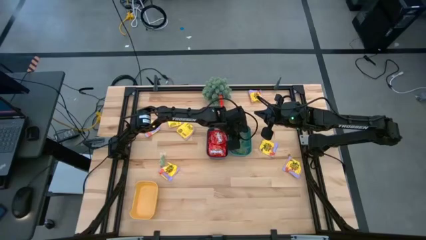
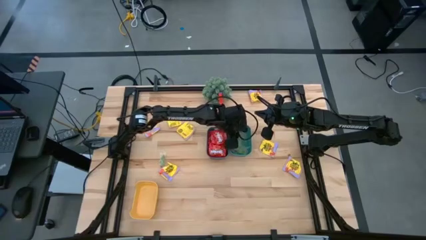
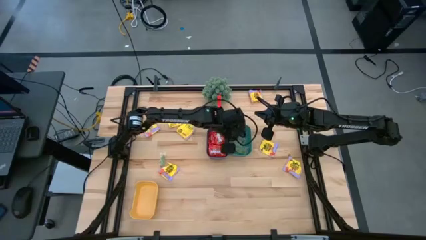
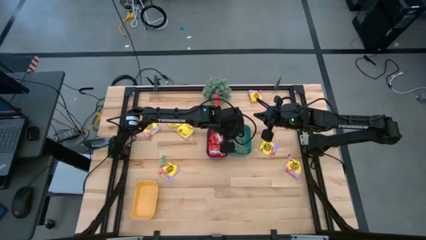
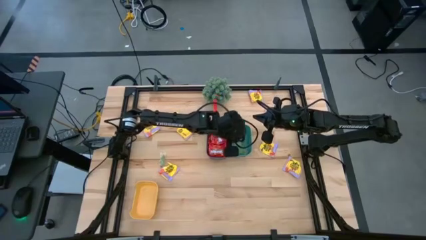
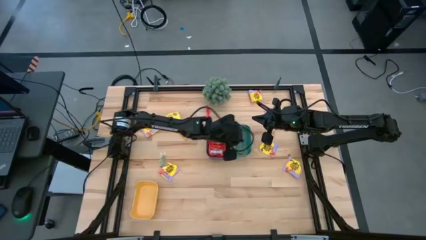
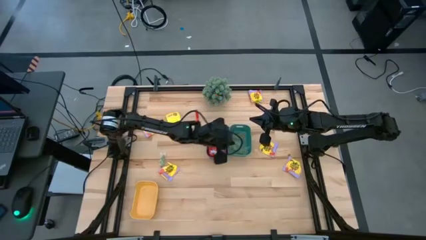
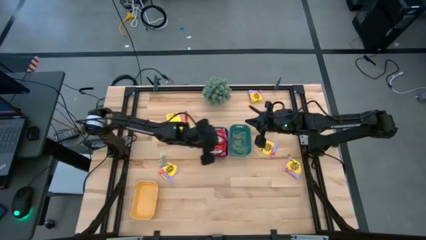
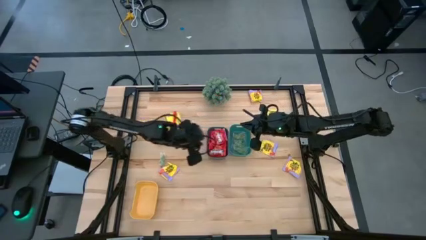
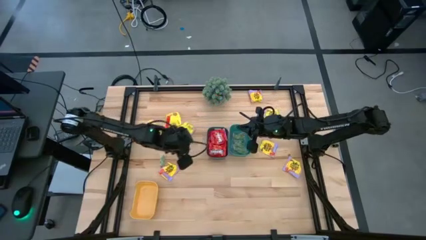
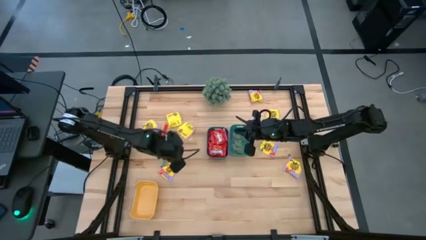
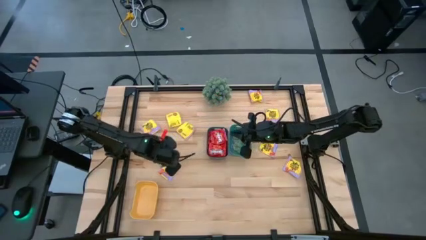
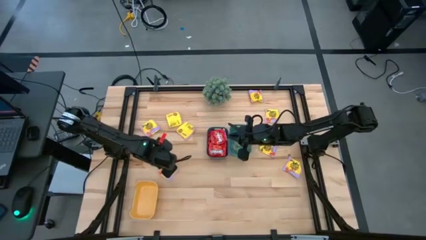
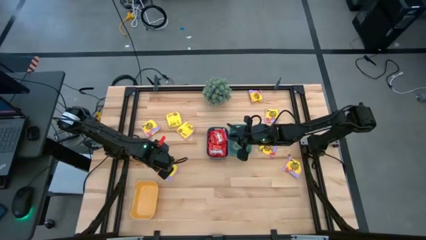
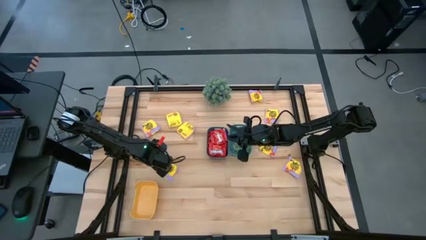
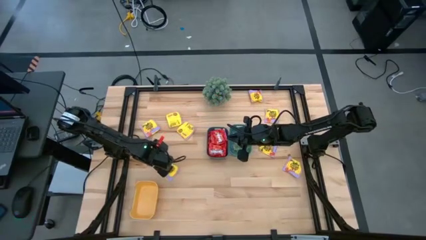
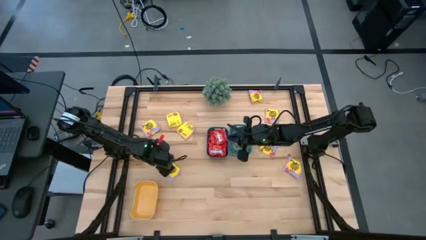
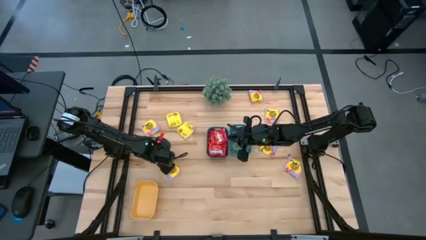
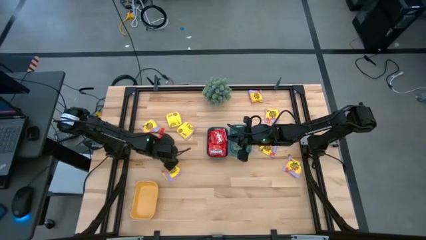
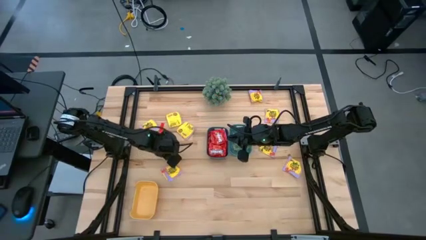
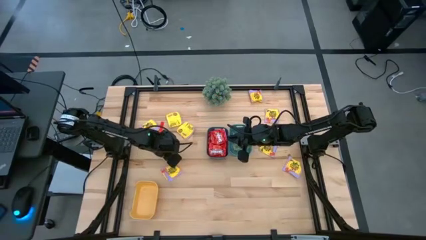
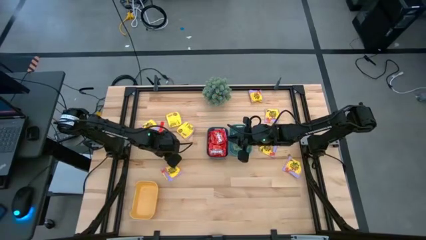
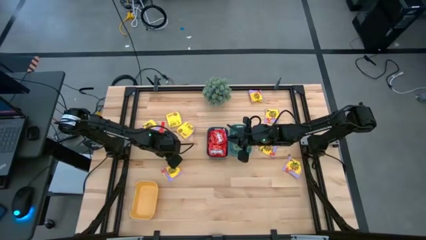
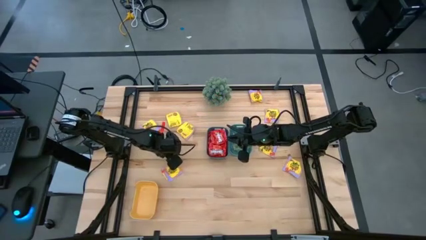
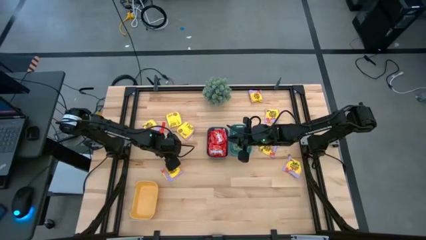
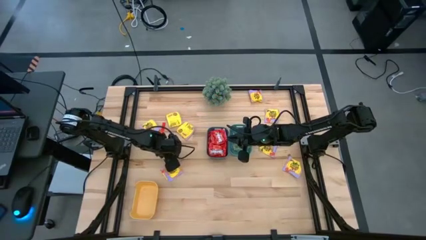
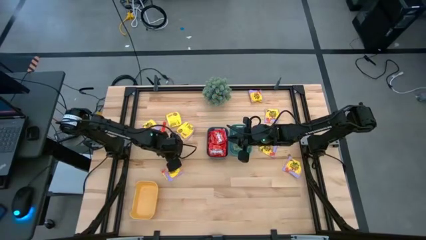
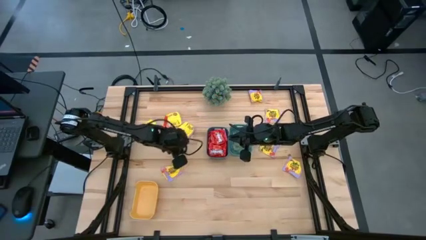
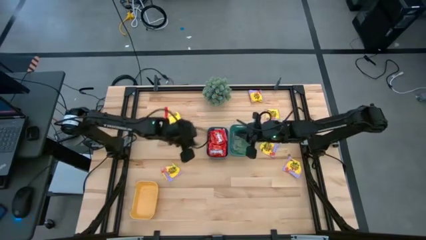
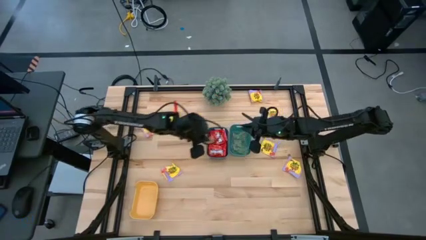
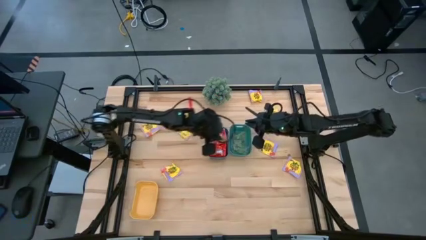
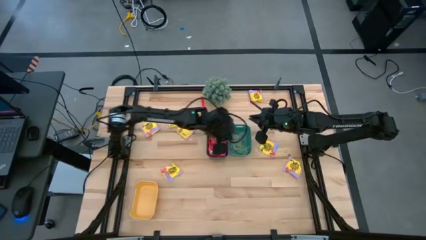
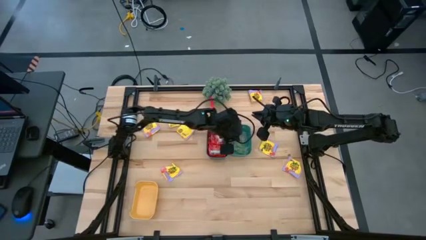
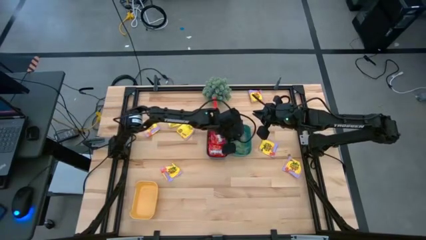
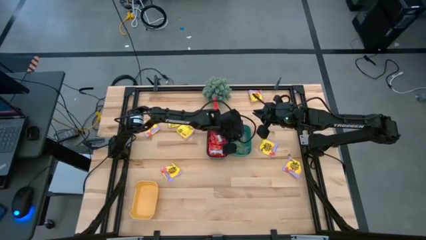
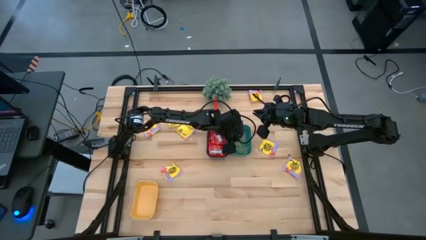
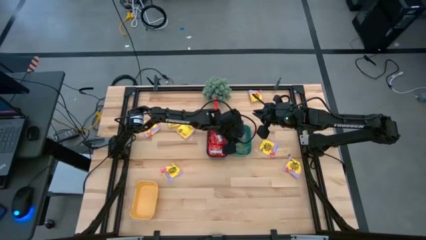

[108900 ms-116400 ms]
Task: Sort candy
Put the green gummy into the green bin

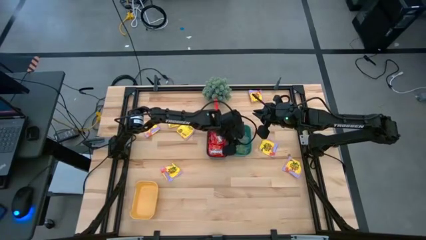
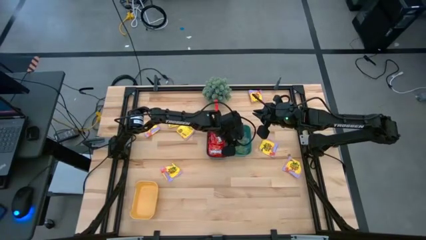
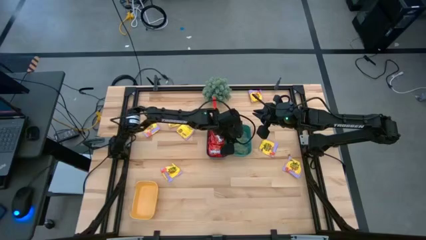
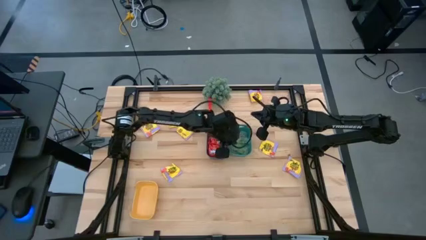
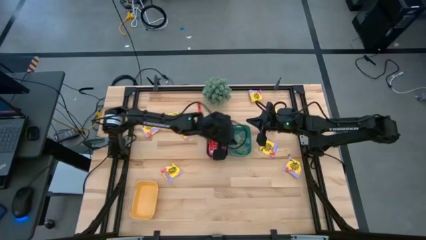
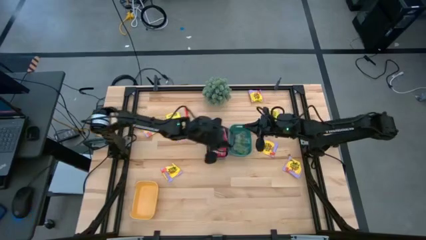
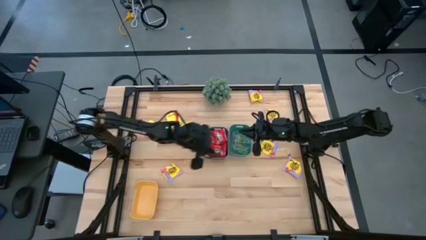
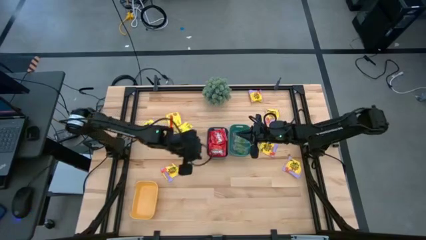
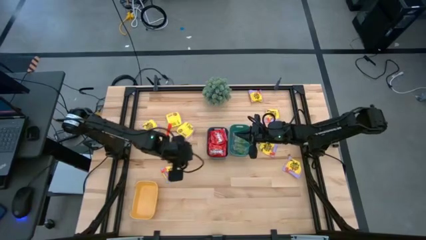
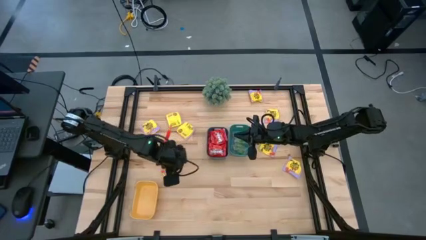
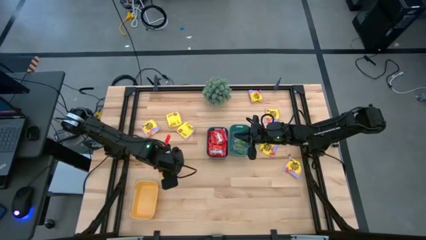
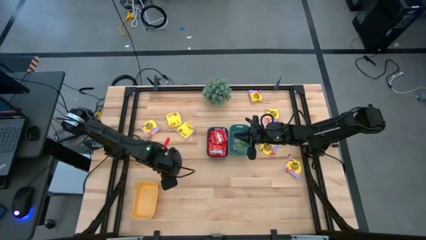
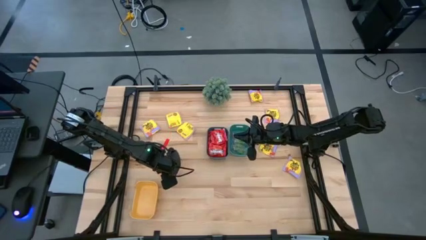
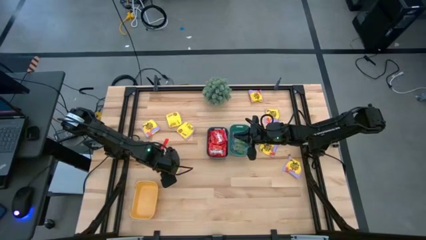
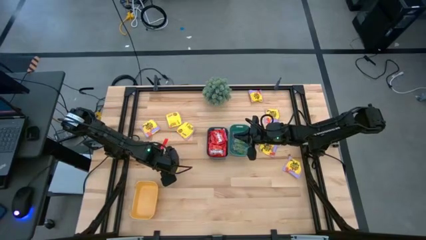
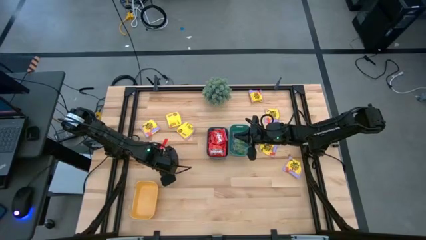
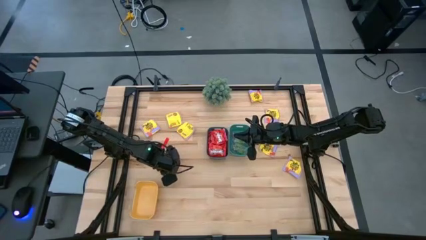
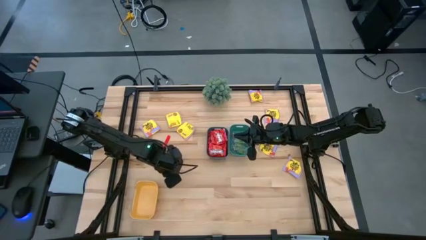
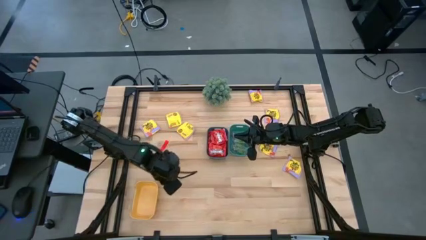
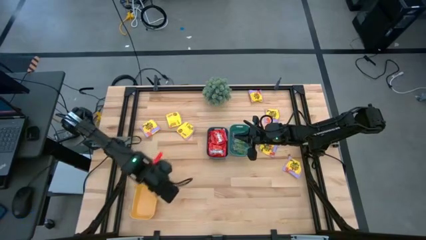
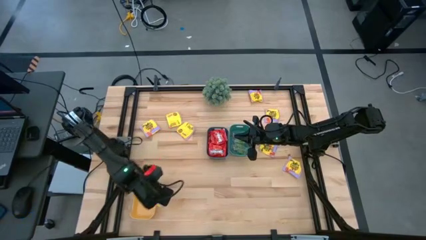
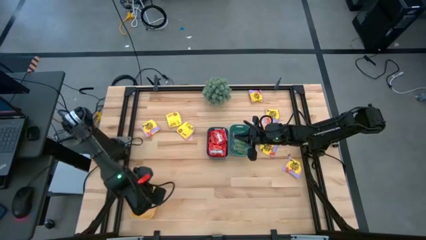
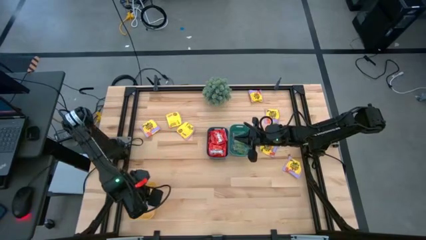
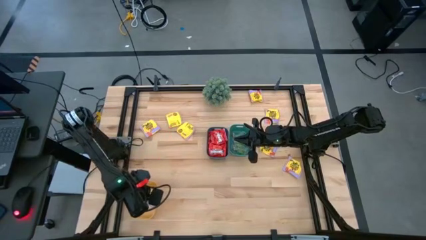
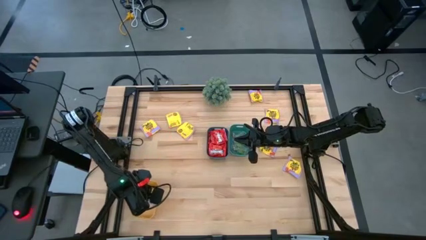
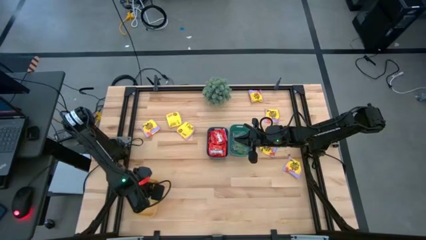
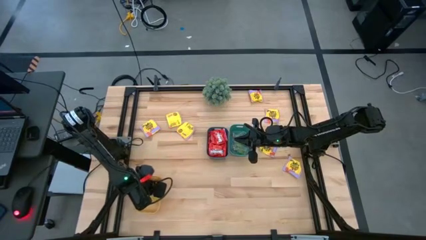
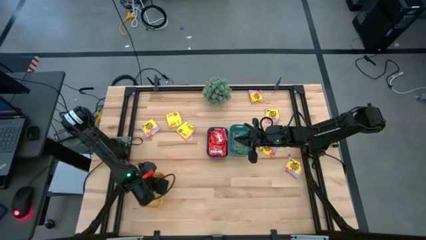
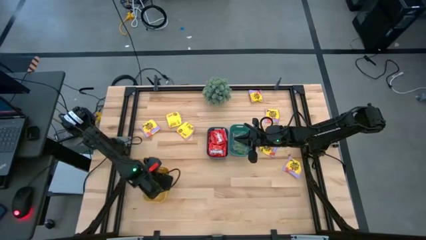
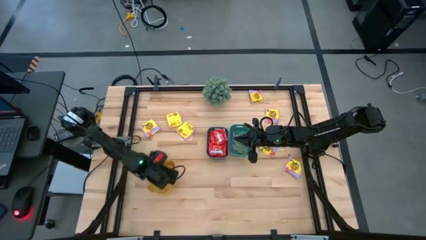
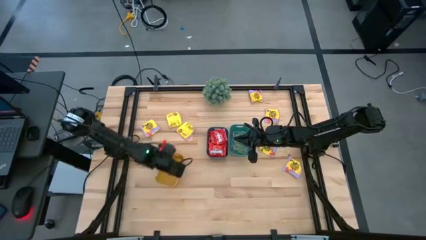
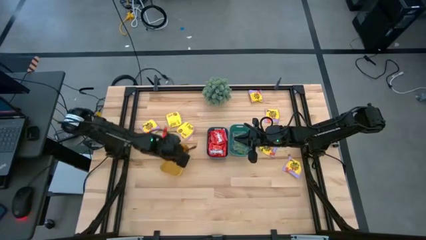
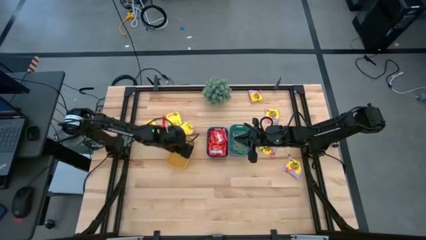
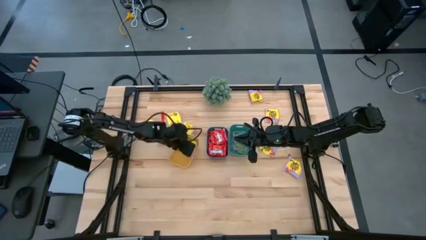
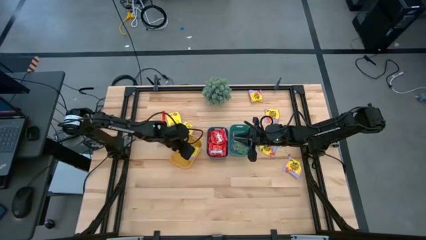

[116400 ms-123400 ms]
Put the yellow candy pack into the yellow bin

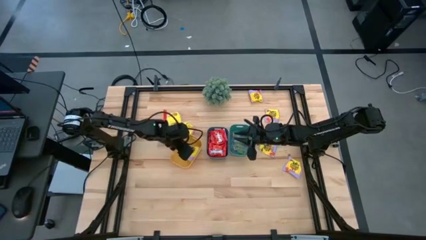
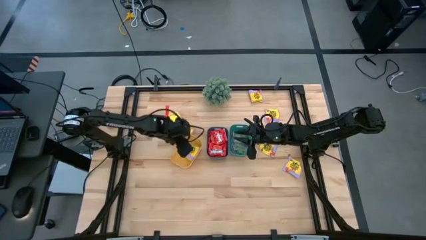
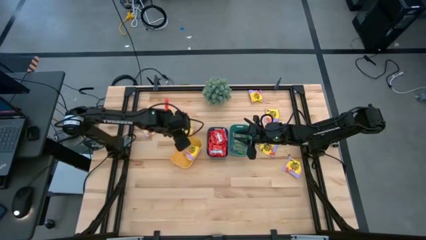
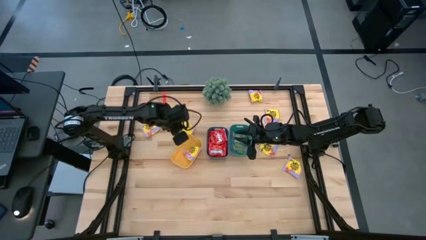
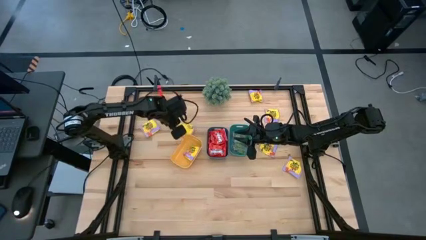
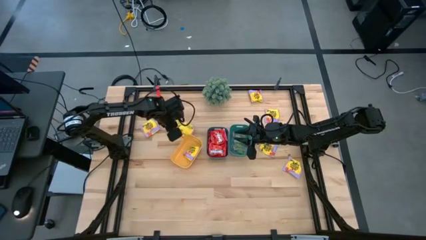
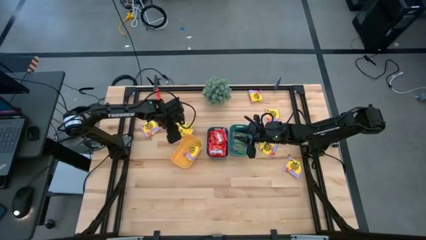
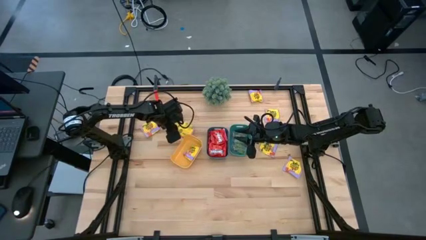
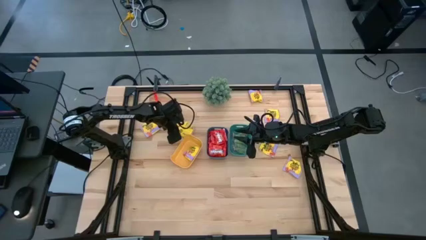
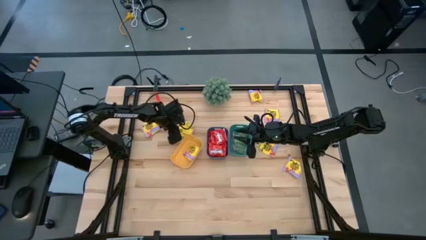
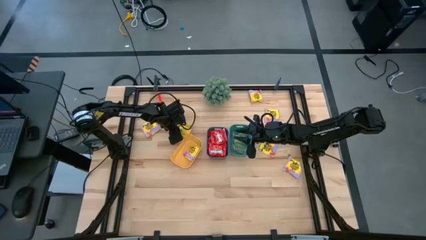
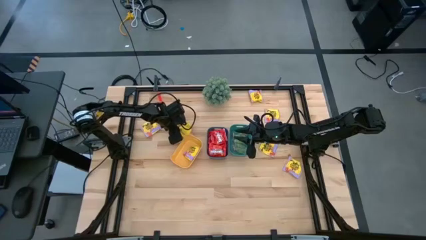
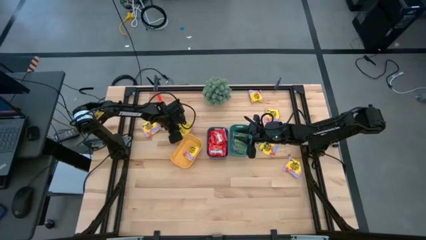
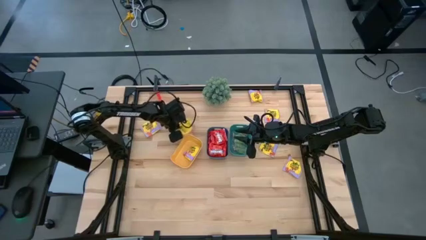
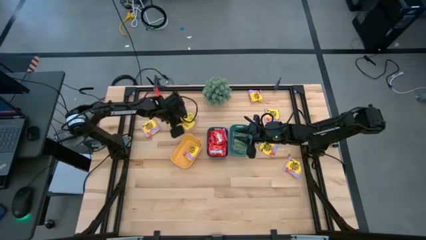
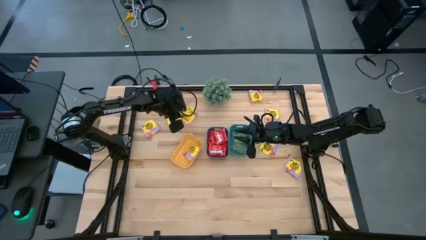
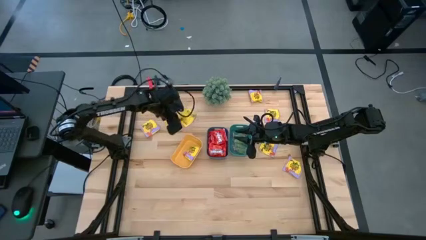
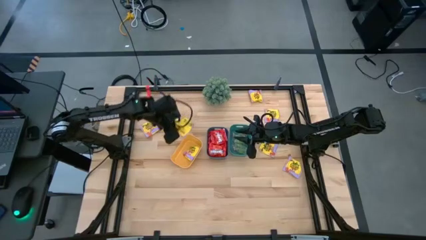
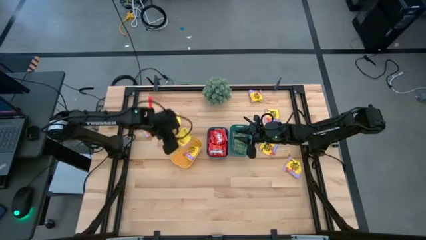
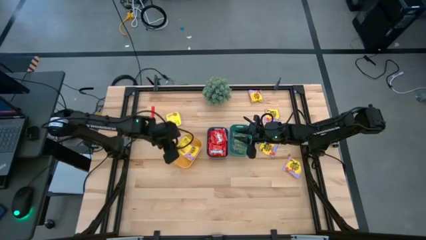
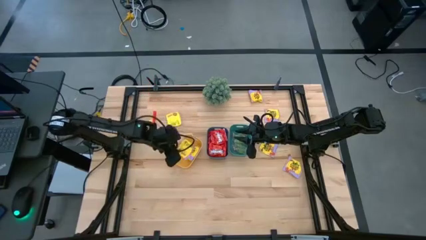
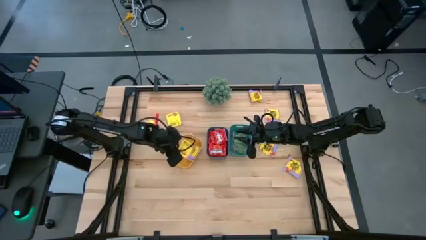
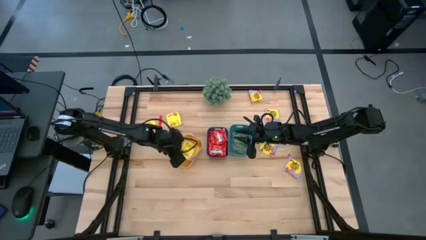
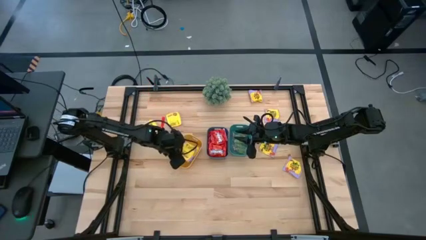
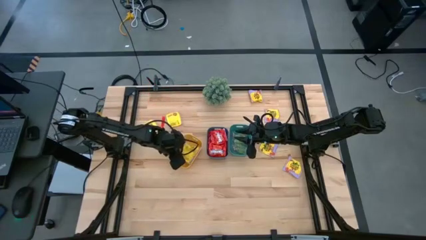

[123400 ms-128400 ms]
Put the yellow candy pack into the yellow bin
